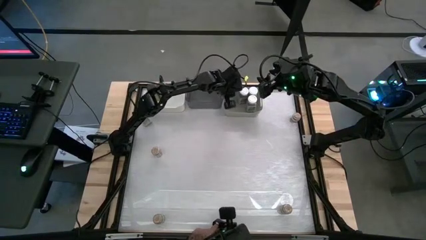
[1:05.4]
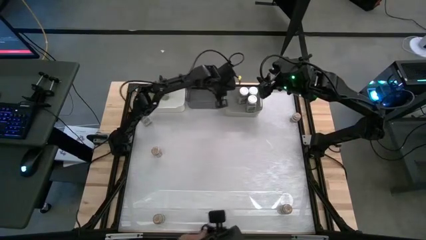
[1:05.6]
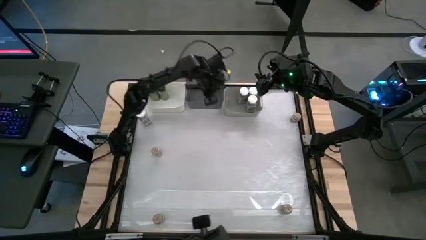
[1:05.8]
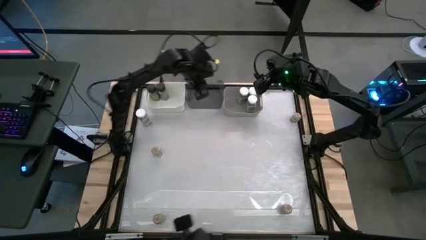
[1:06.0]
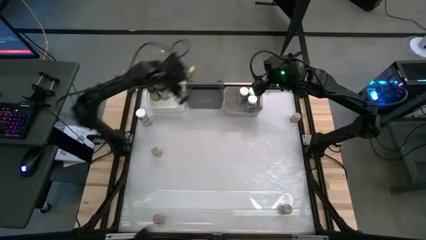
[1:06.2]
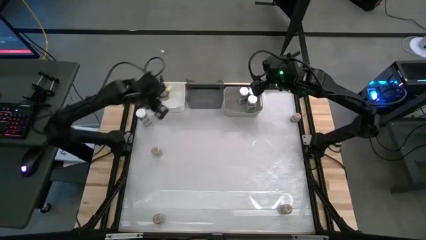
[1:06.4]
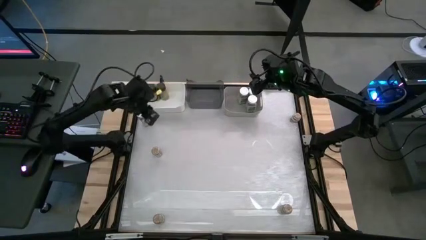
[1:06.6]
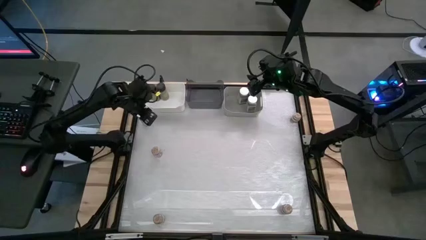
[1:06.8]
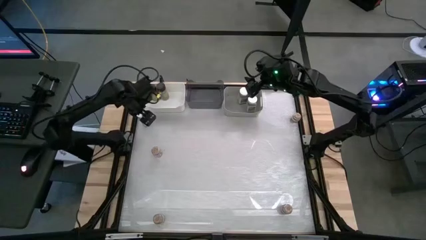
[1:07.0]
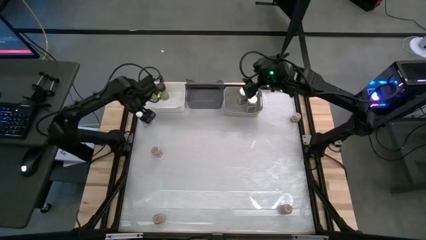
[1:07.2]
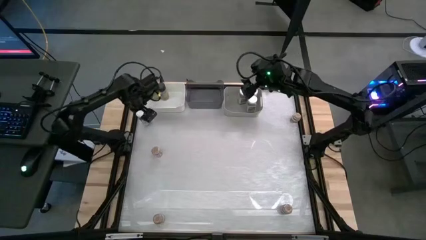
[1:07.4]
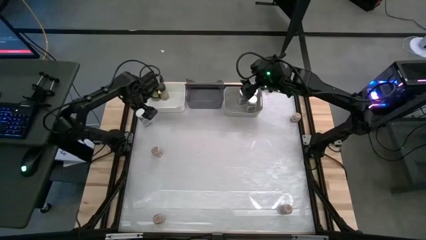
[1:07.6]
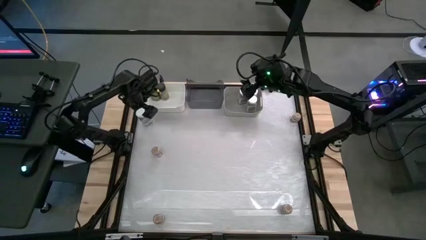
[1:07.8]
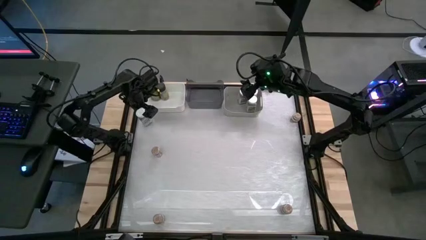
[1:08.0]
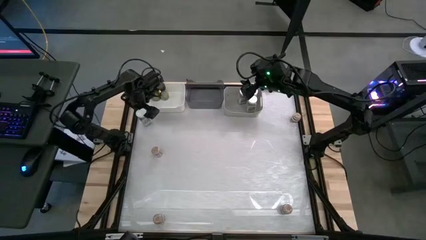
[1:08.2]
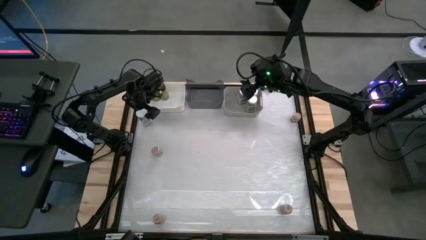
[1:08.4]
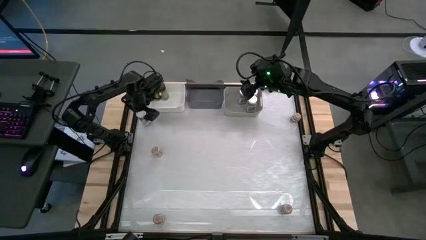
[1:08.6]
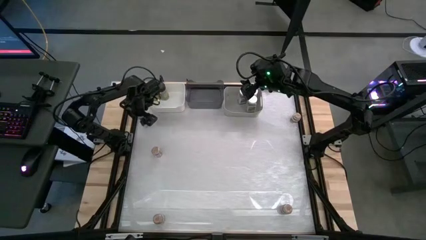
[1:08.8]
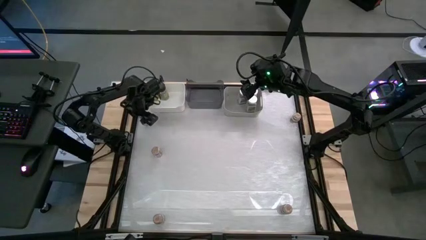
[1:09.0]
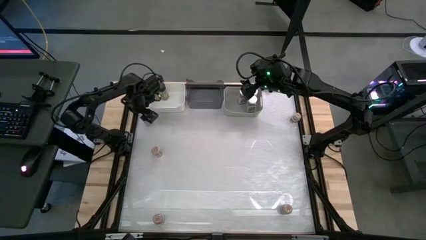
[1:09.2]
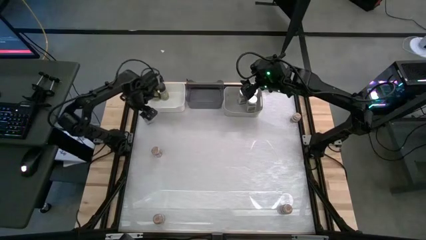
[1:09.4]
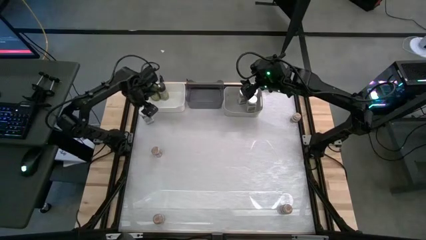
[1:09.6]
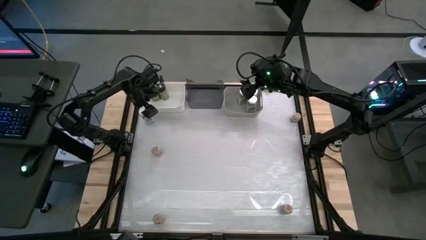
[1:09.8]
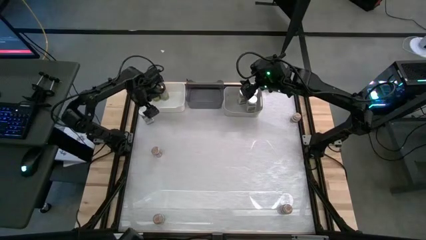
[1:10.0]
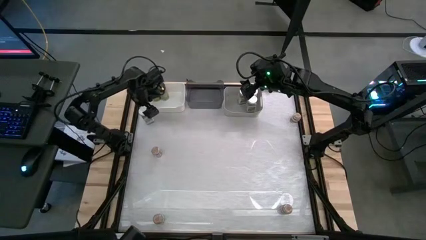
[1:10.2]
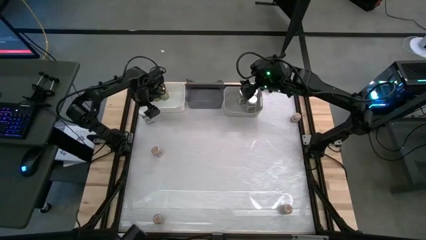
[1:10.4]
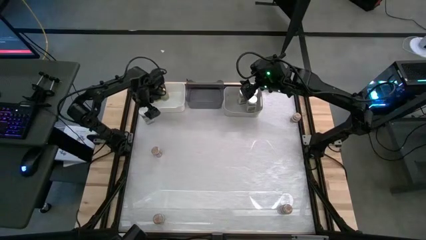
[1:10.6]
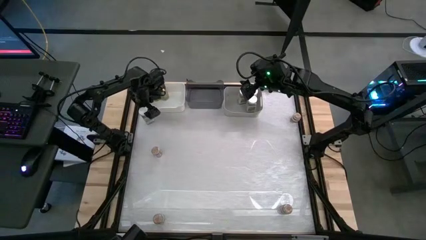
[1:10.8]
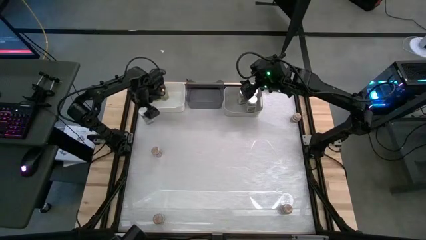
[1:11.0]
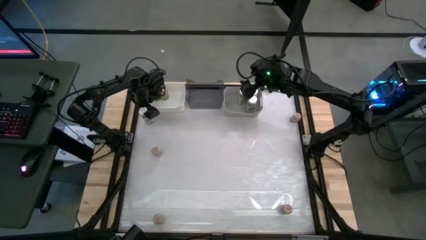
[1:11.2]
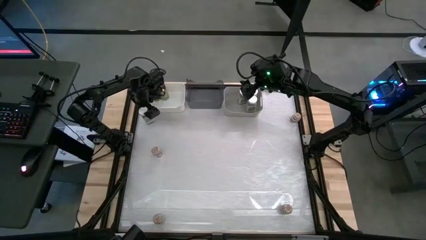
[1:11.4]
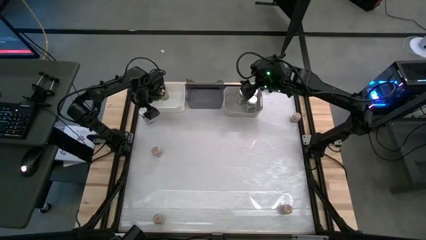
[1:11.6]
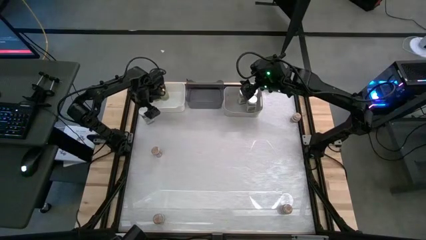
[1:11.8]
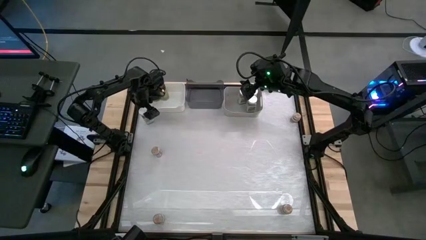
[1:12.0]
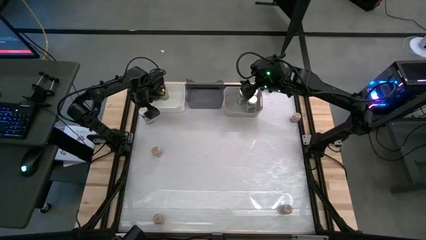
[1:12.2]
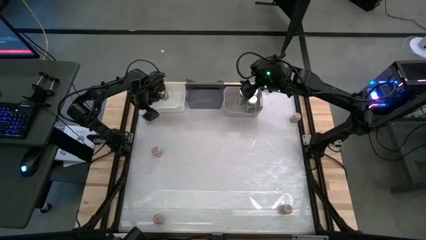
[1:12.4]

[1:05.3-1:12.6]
Task: Sort spices by type
Put the white seasoning bottle into the gray bin

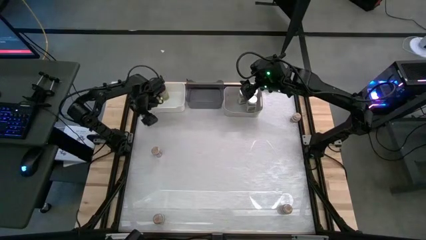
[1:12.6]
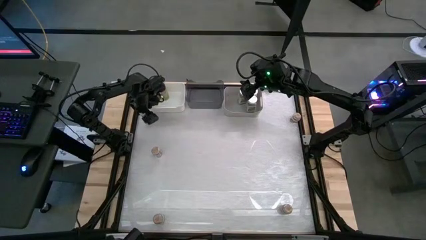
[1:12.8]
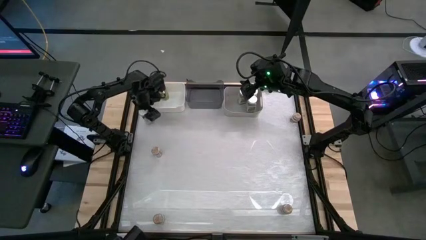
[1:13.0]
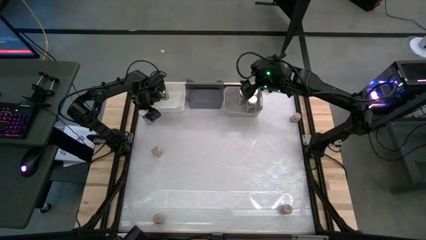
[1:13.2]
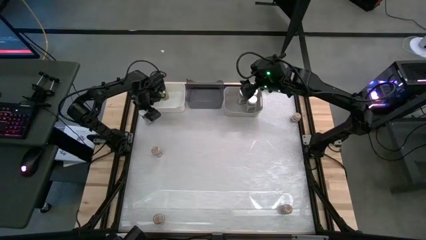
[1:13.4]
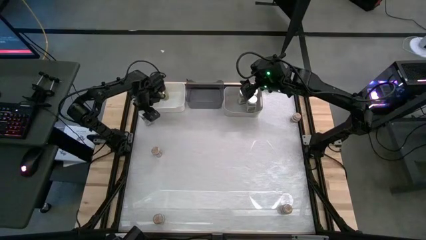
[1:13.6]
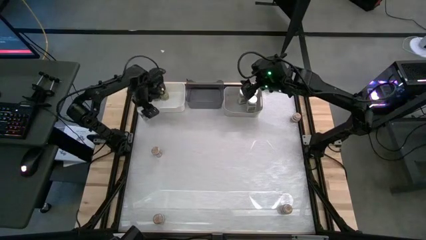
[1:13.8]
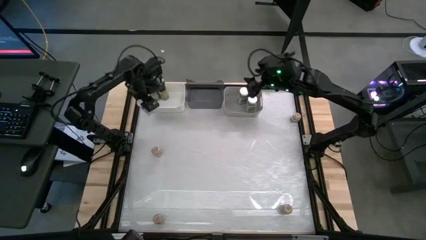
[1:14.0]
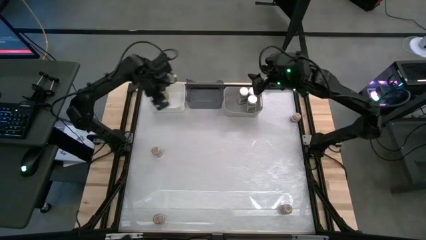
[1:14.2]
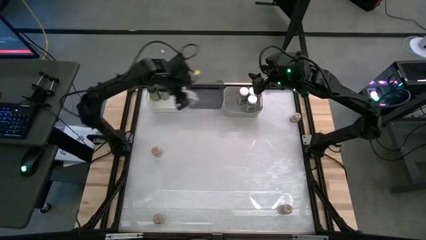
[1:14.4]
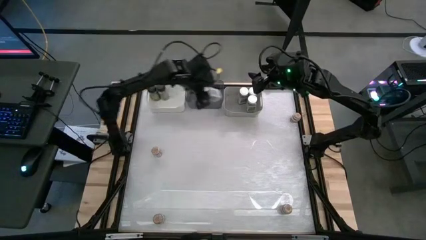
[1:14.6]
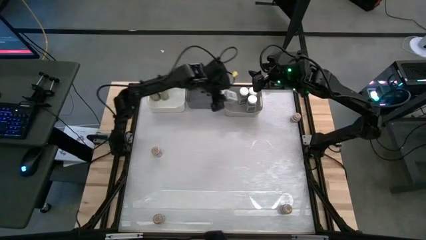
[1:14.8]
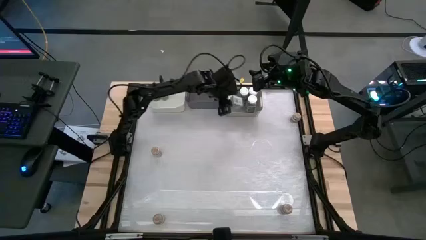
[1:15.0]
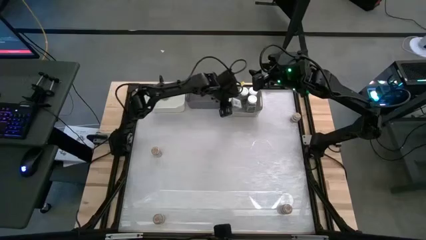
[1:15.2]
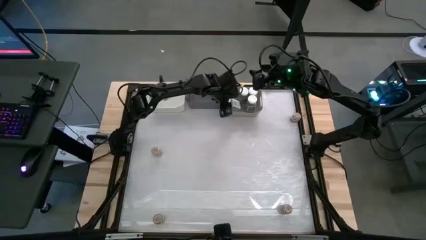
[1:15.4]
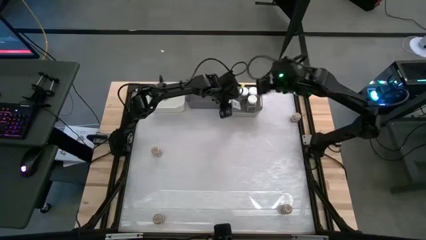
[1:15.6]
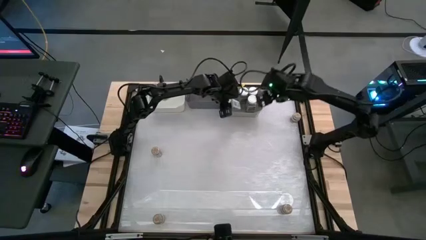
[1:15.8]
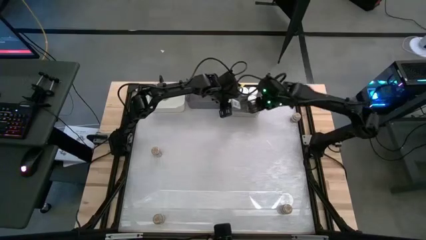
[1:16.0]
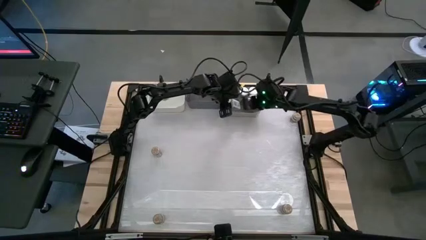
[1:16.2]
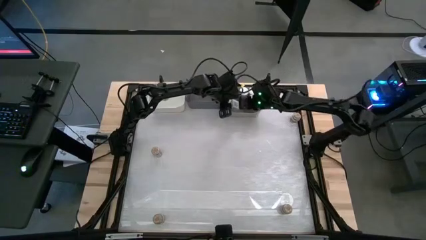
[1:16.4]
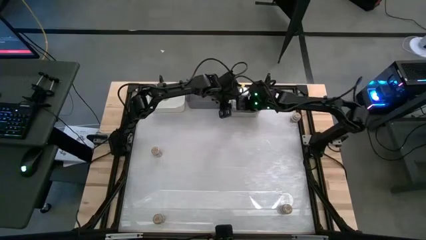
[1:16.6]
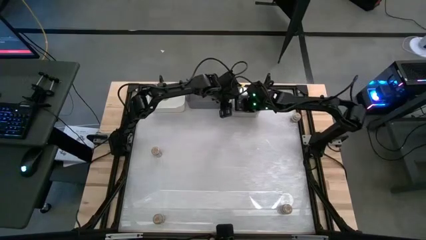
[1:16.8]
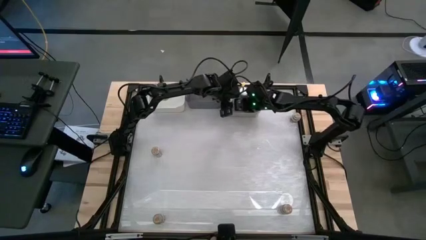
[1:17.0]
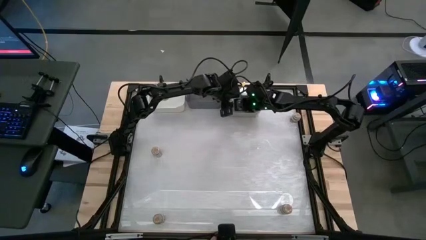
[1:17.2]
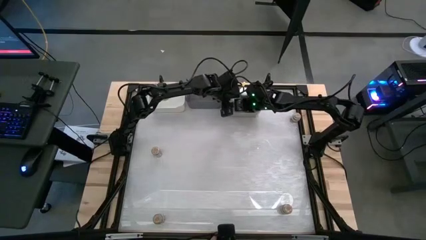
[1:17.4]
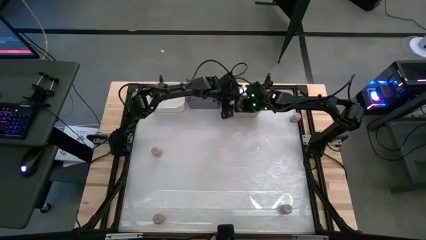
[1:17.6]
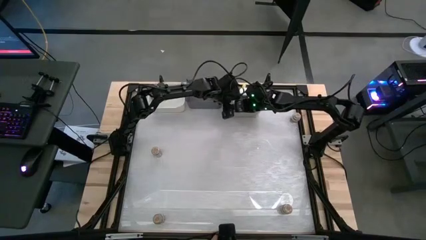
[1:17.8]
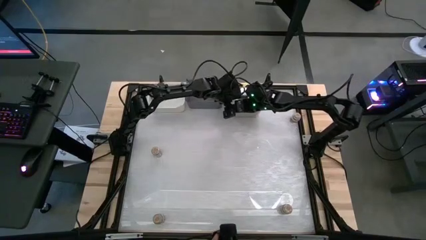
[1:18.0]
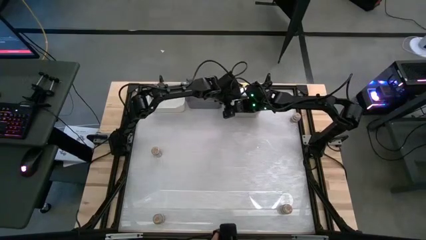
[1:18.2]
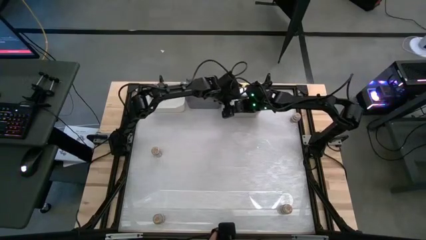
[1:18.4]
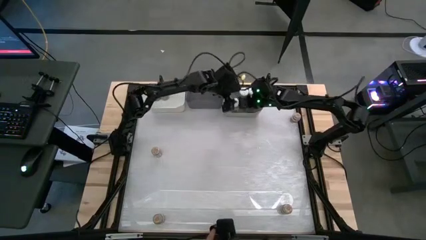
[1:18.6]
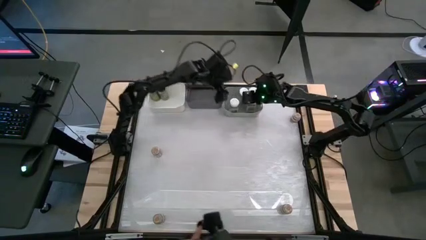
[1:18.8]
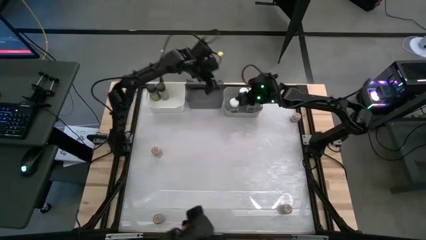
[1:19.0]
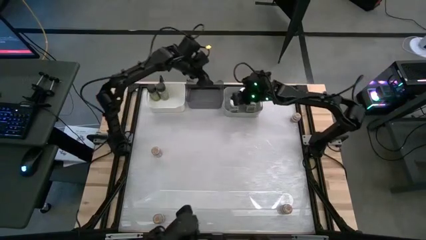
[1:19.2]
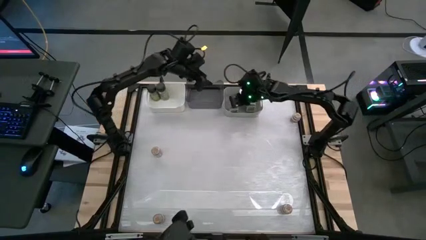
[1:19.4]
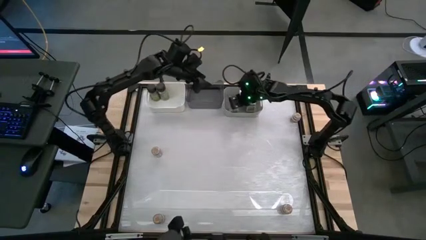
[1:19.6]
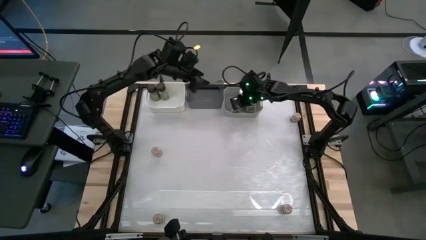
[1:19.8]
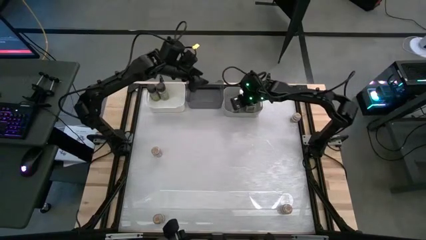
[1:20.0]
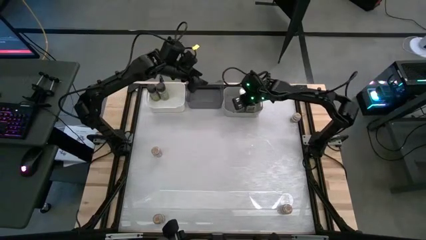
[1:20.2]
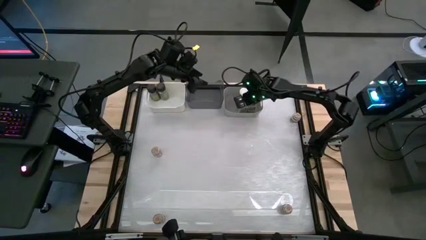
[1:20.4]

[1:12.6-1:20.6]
Put the white seasoning bottle into the gray bin
